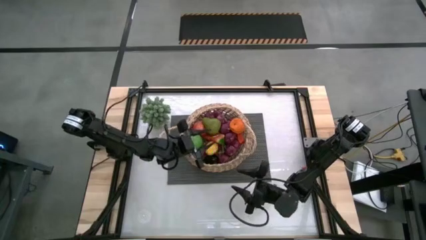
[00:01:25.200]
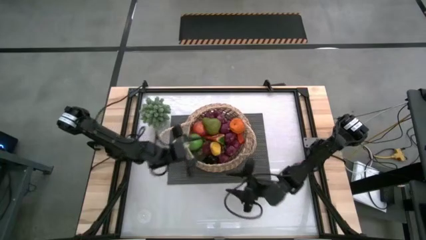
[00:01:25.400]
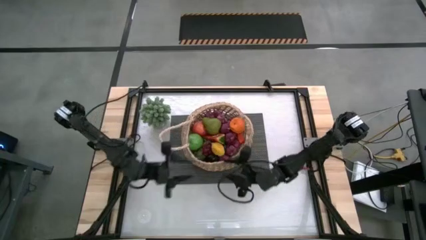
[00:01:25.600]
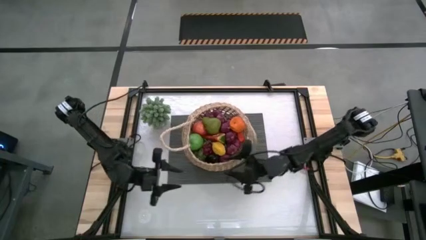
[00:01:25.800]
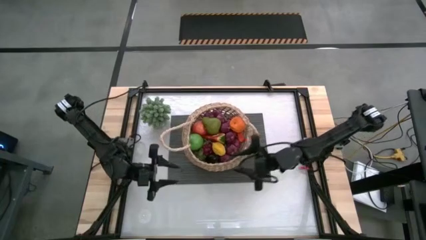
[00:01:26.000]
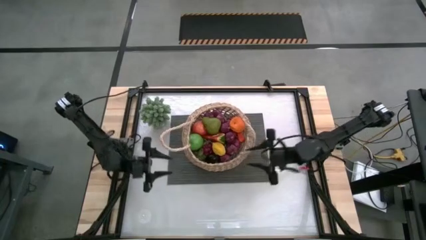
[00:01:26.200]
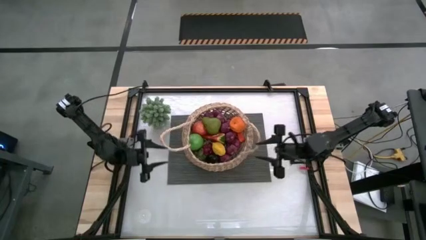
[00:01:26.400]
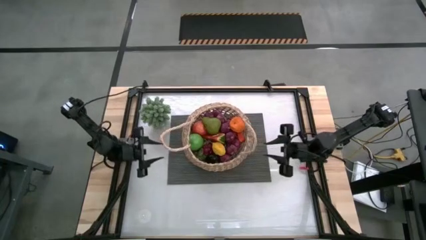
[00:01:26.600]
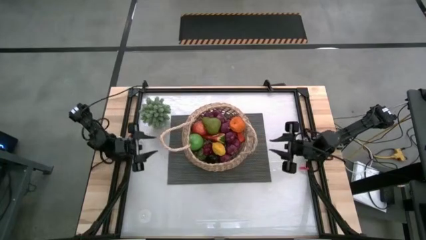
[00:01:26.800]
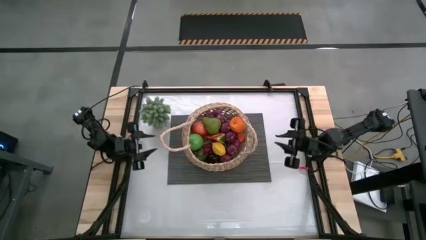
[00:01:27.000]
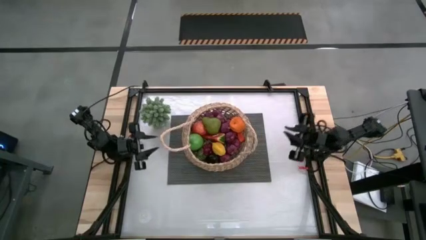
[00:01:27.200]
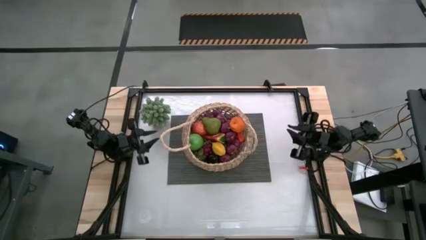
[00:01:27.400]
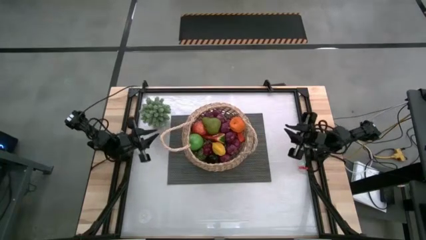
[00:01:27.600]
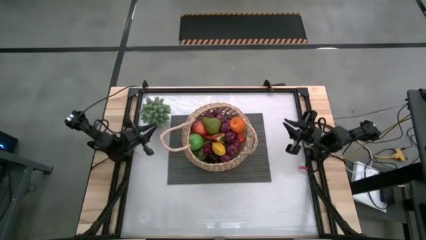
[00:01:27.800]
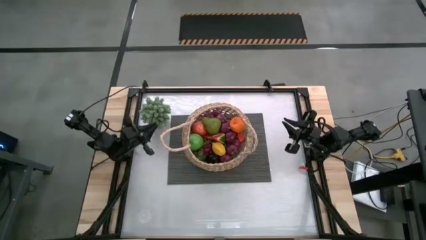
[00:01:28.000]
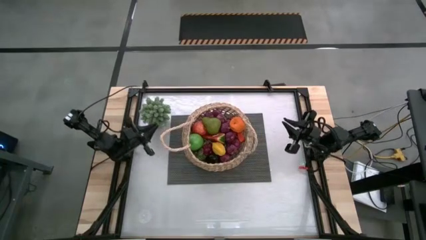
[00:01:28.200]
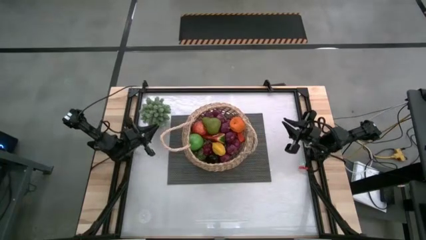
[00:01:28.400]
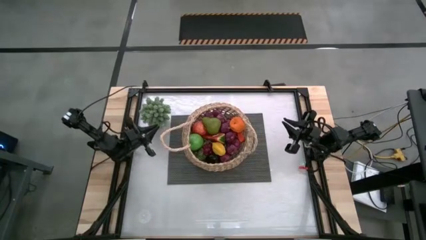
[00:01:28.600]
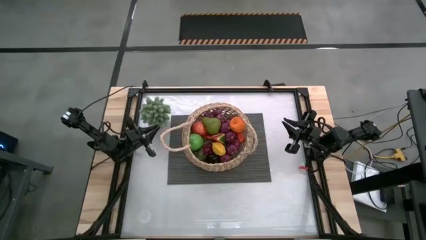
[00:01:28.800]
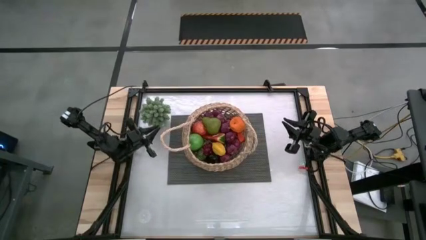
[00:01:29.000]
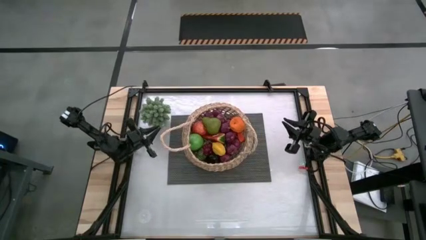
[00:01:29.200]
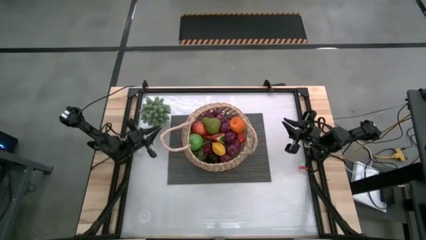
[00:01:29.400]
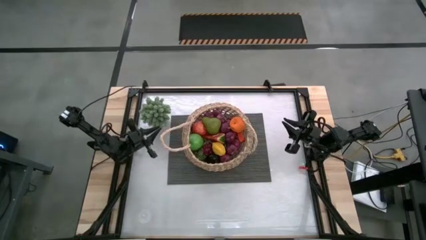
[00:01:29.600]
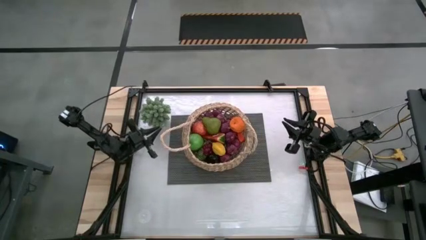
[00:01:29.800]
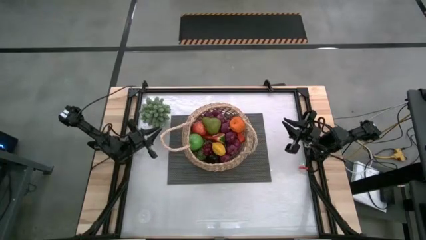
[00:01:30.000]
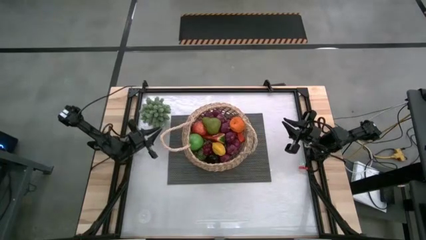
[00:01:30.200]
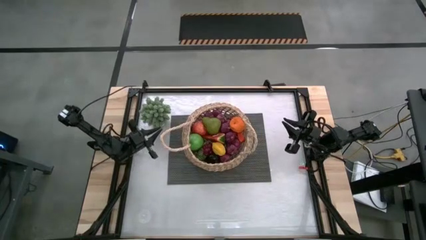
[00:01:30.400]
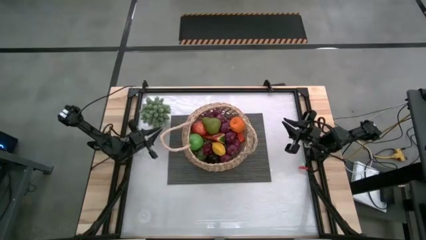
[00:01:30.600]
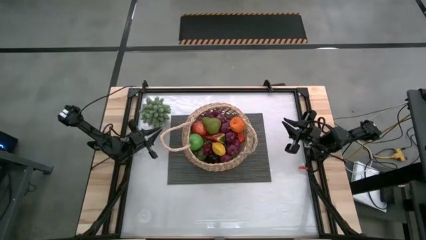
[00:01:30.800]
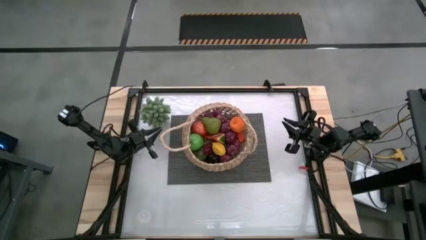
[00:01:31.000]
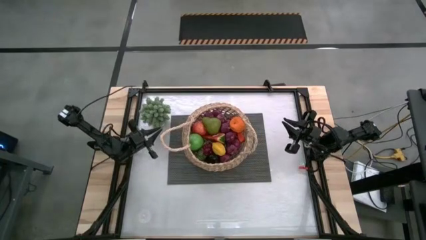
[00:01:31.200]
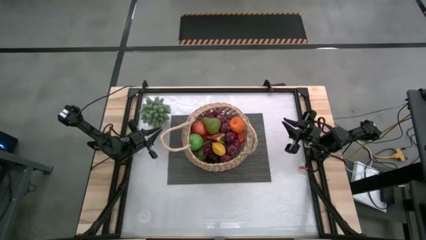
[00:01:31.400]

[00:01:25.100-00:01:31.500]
Task: Build produce basket
Return to Home Position

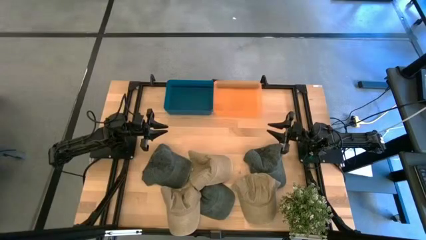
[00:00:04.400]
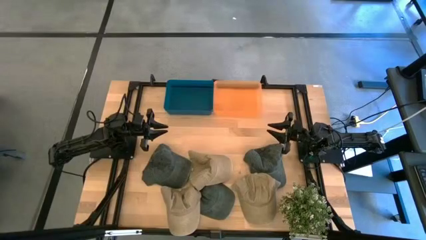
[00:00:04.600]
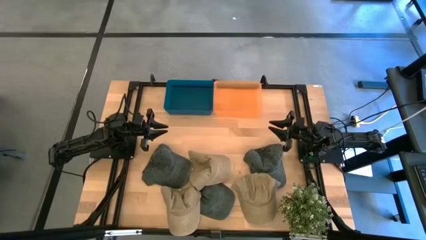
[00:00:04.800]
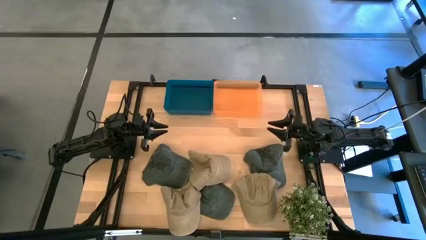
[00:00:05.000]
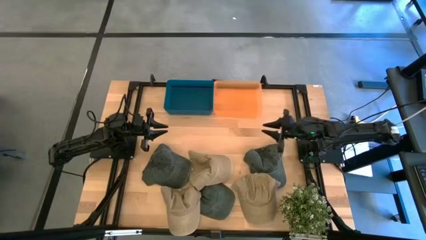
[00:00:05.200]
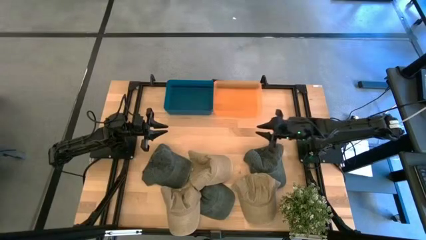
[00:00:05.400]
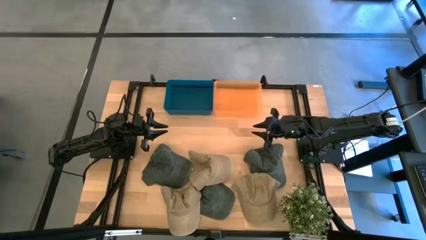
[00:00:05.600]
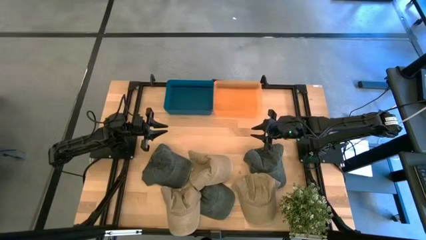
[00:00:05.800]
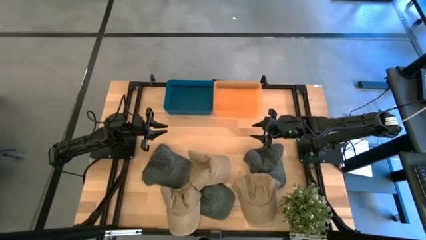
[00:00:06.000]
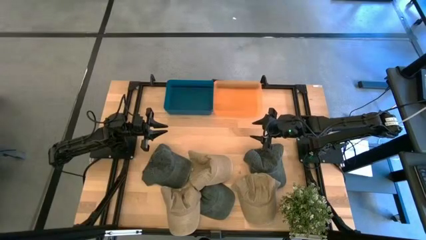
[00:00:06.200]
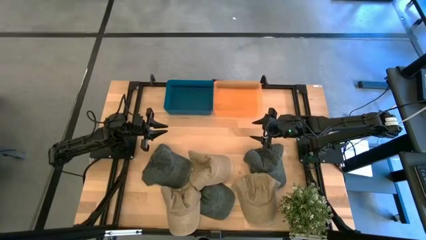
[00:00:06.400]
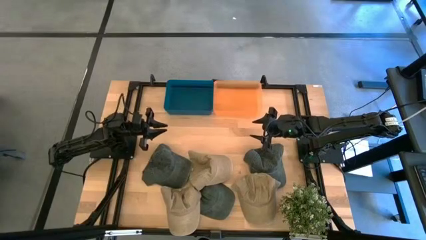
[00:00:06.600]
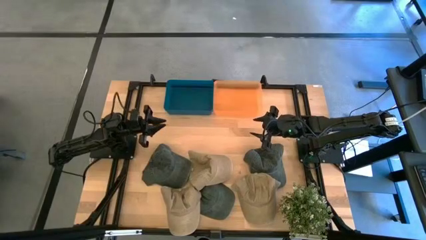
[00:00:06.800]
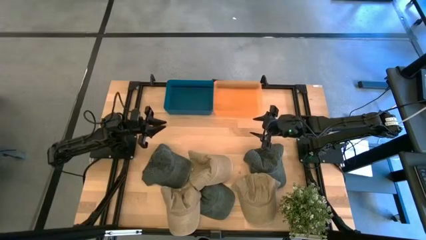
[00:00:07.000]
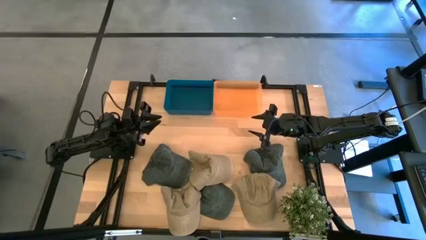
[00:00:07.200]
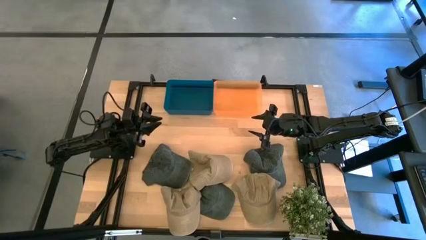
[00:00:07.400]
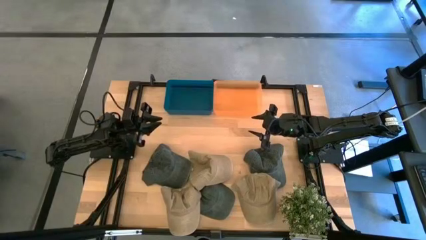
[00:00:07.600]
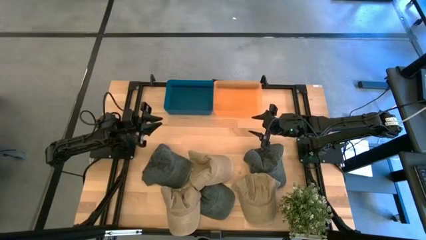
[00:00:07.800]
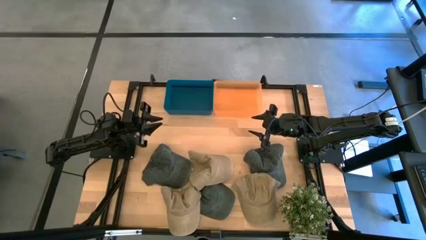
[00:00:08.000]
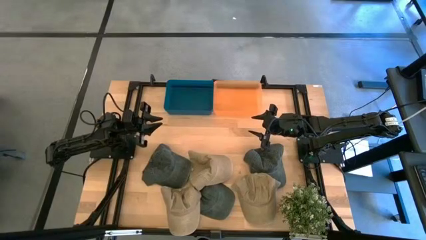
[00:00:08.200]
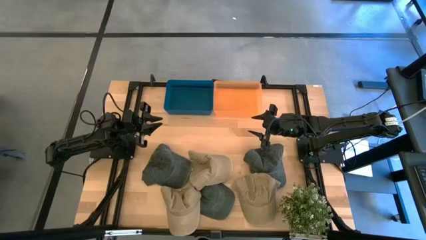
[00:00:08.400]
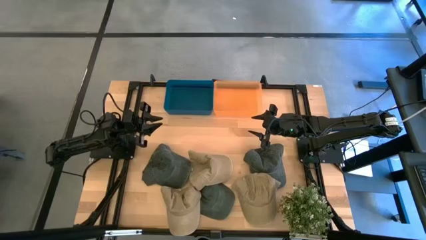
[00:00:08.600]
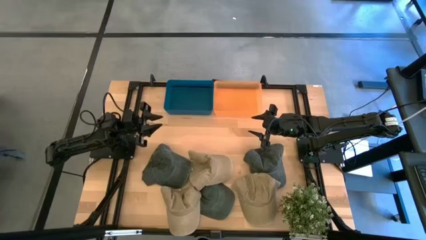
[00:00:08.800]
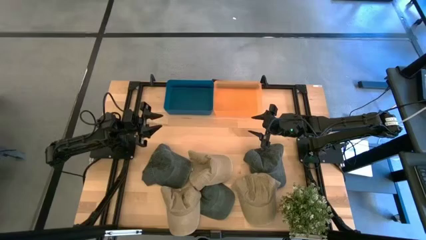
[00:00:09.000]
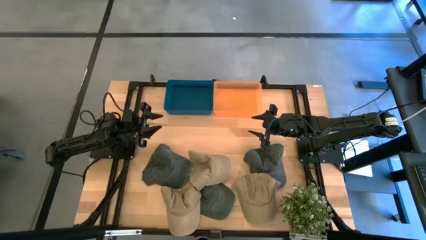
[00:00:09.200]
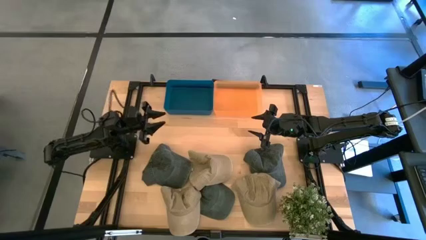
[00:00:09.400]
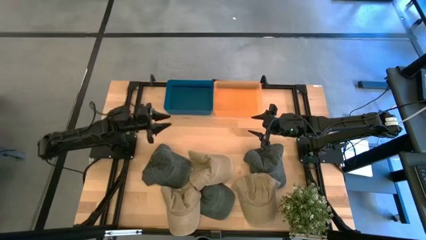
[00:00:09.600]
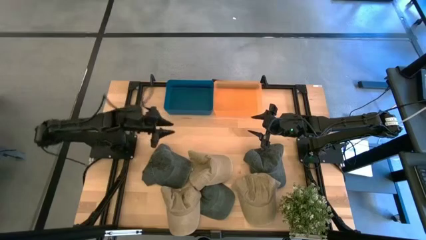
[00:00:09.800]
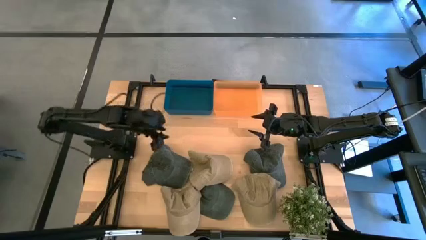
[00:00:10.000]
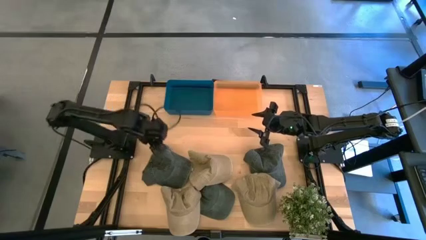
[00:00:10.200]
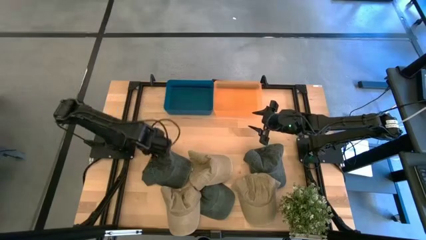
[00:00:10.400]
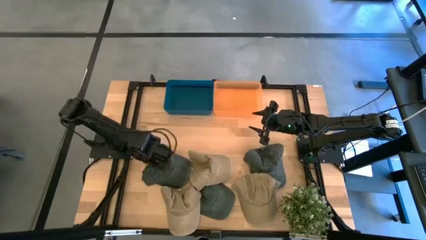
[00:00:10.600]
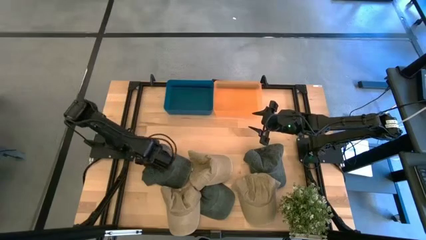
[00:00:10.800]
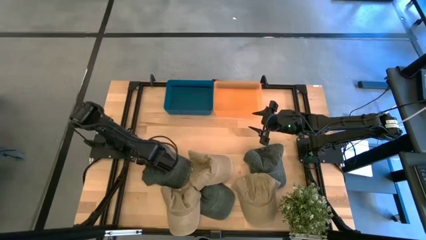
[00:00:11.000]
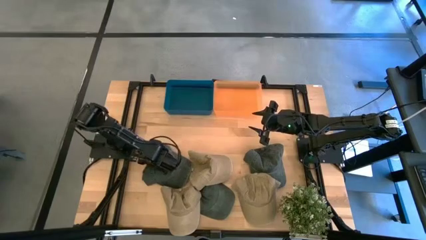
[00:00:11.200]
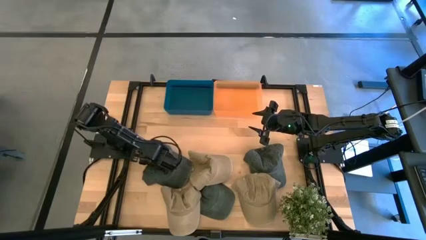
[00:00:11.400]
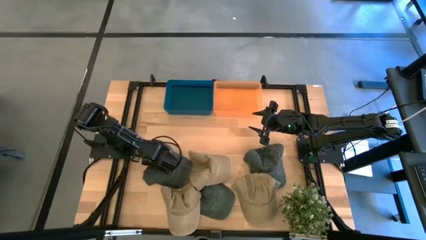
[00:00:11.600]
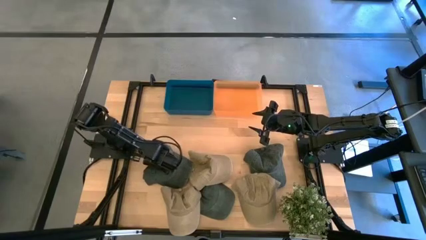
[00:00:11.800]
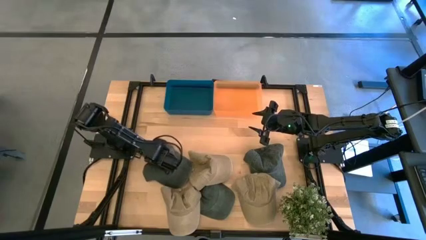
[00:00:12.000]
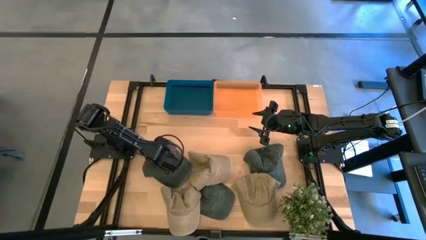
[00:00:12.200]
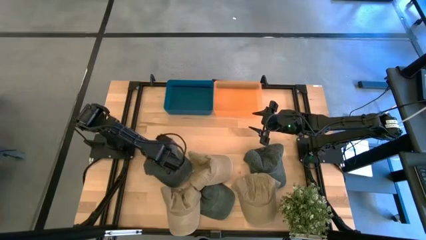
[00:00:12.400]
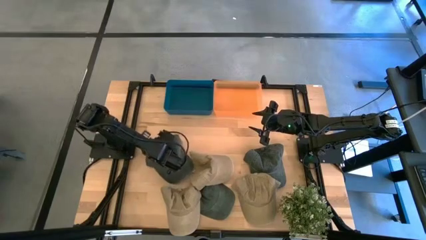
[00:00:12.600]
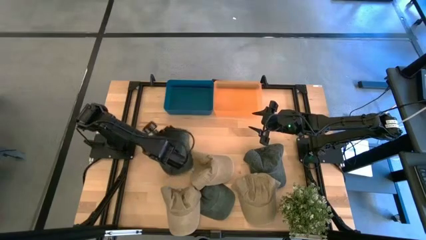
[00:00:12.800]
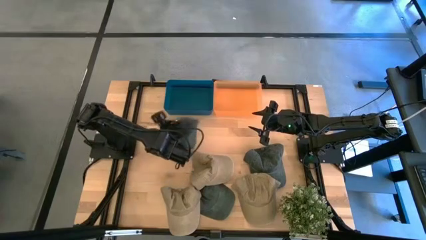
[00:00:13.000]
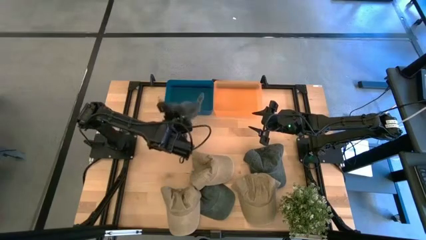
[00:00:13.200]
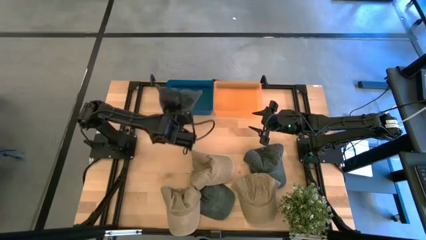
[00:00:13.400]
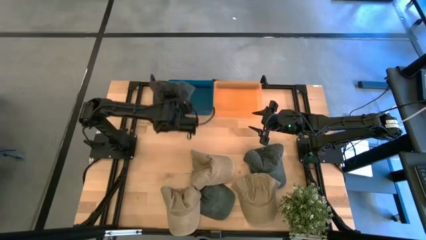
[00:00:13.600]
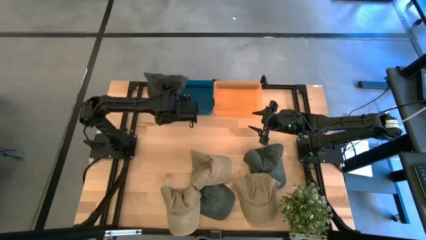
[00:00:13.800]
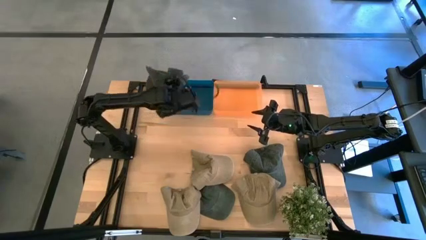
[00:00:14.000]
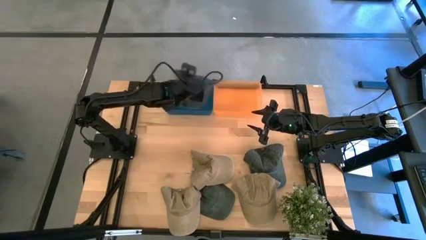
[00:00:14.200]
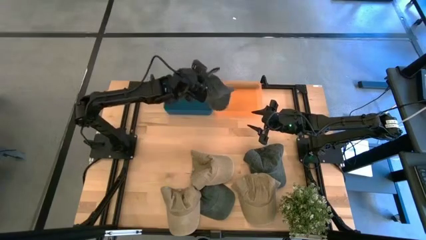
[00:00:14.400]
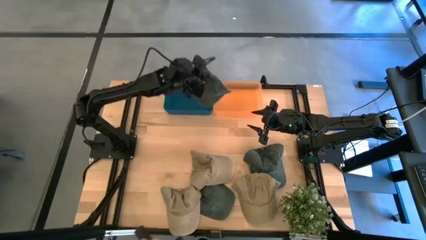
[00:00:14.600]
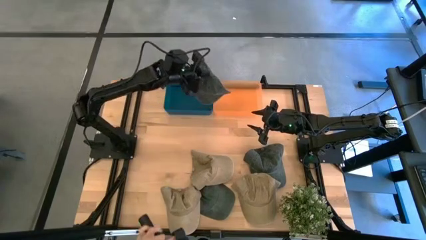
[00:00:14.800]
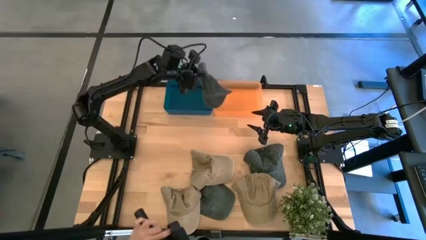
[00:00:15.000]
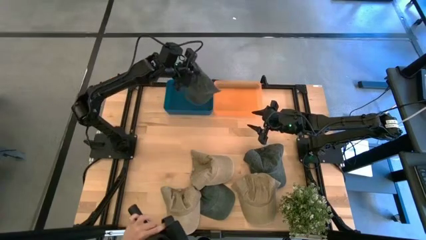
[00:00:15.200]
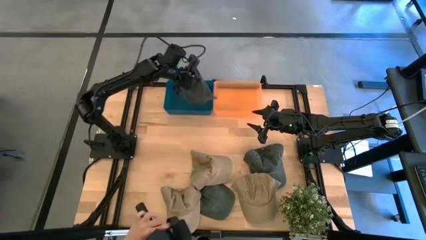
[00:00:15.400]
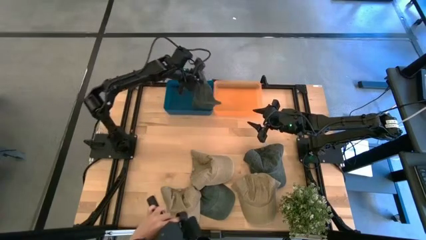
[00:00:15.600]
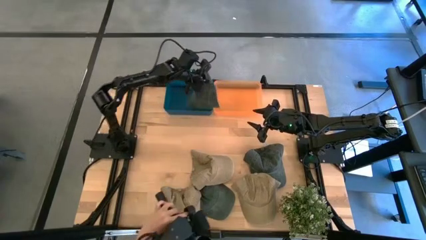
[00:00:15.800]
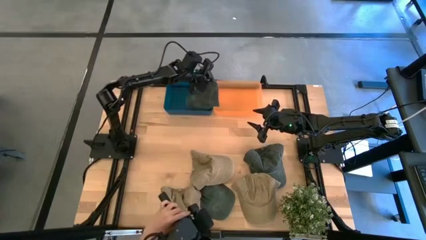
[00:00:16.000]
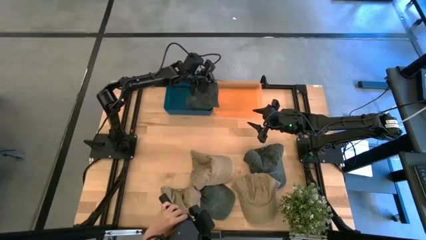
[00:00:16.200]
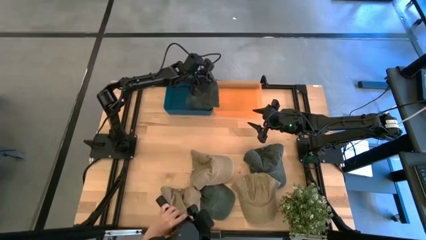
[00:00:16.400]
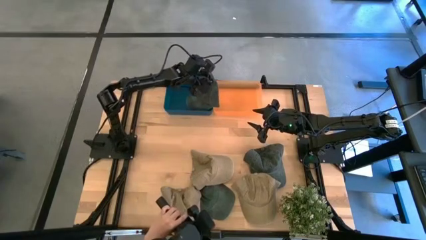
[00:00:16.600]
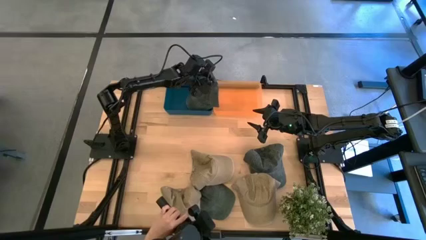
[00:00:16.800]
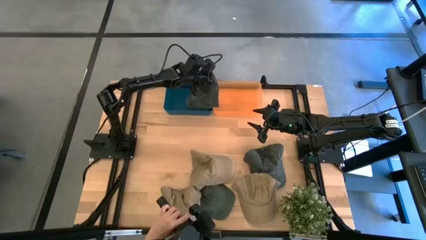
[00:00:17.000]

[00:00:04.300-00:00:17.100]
Task: Pick & Place hat
Put the top left black cap into the blue bin
